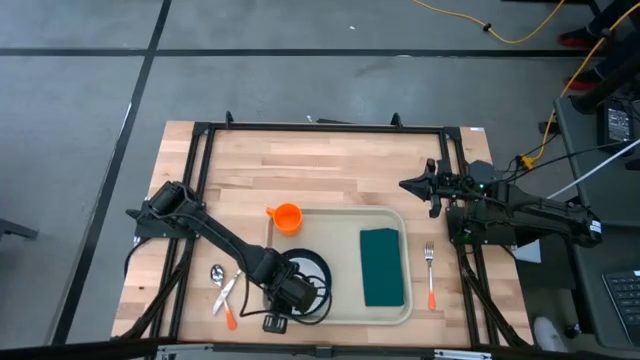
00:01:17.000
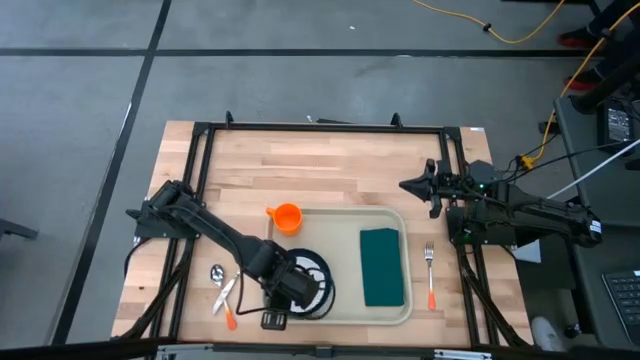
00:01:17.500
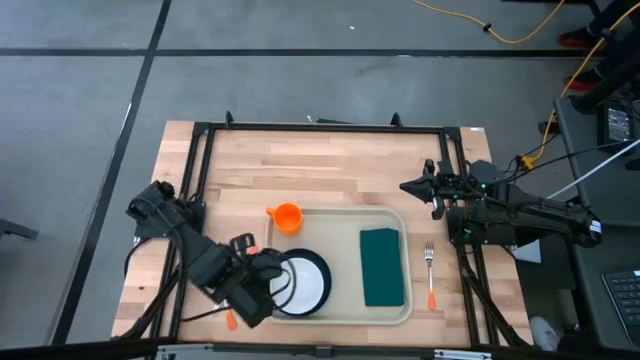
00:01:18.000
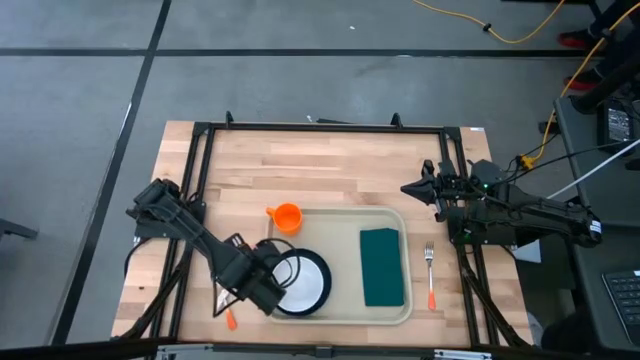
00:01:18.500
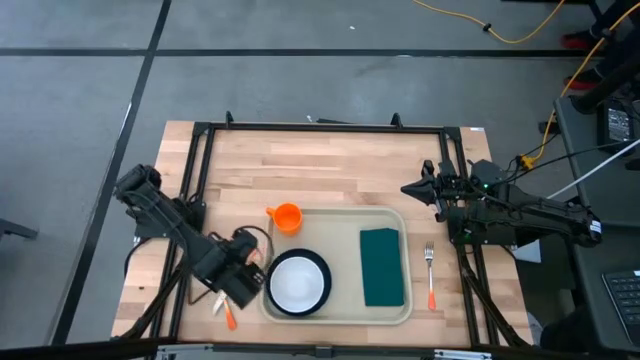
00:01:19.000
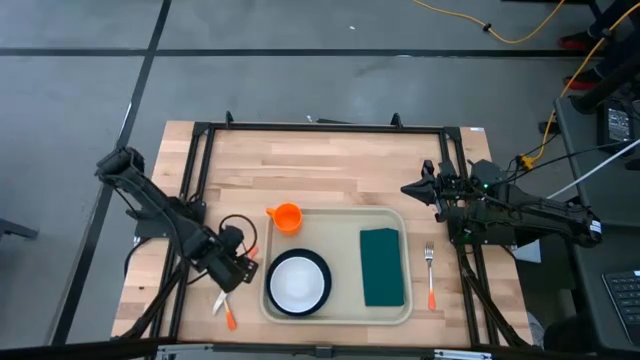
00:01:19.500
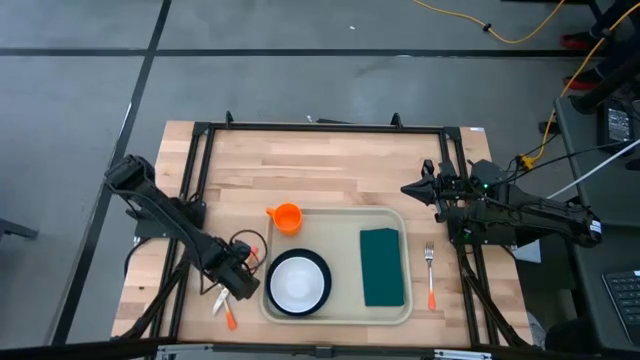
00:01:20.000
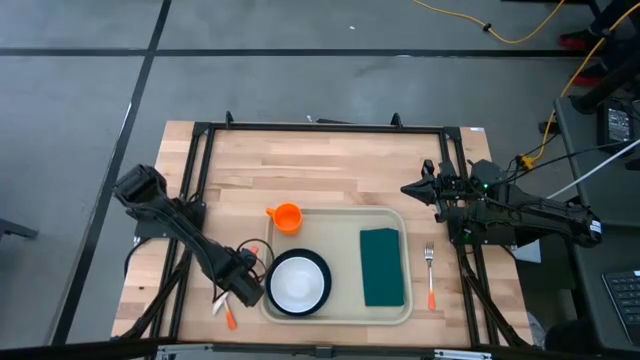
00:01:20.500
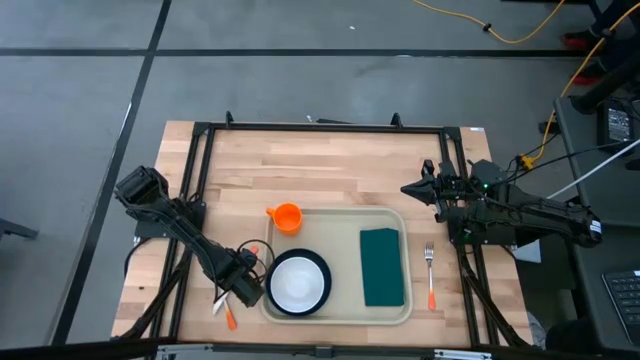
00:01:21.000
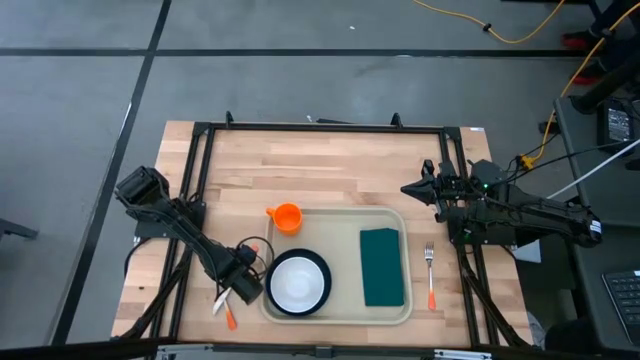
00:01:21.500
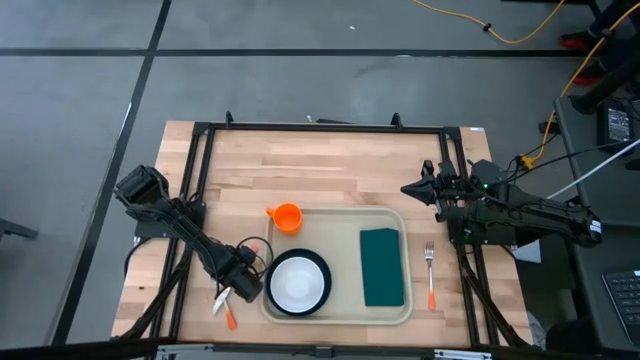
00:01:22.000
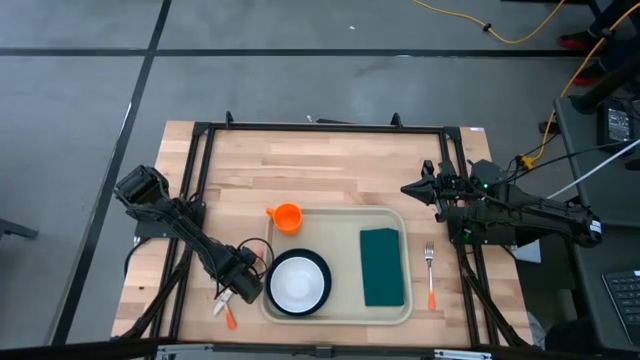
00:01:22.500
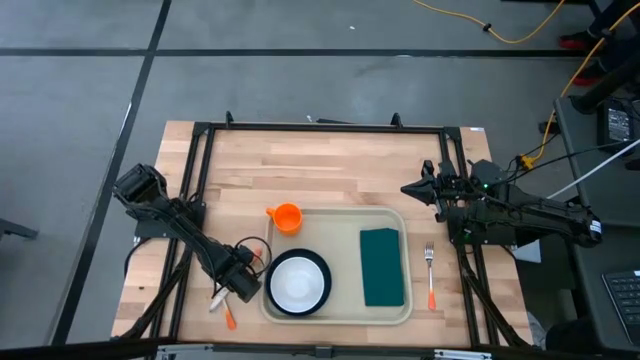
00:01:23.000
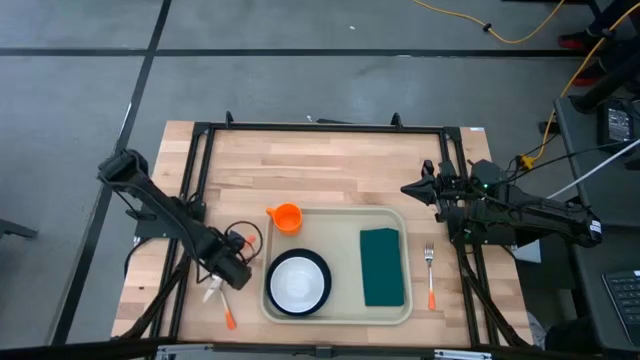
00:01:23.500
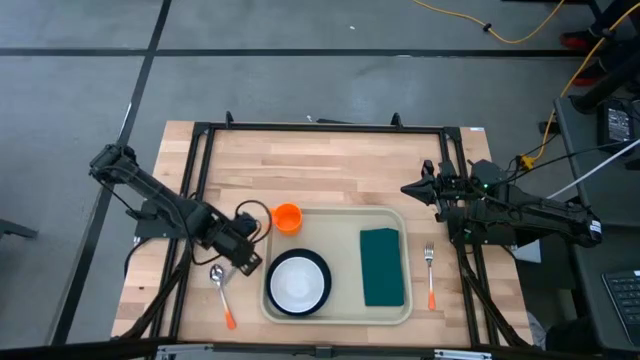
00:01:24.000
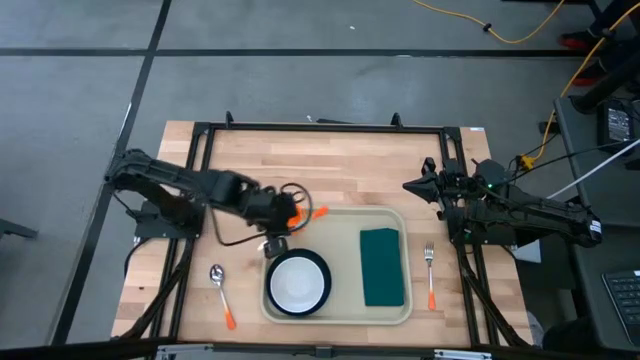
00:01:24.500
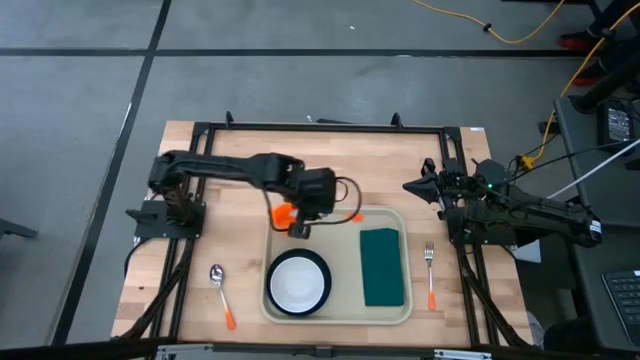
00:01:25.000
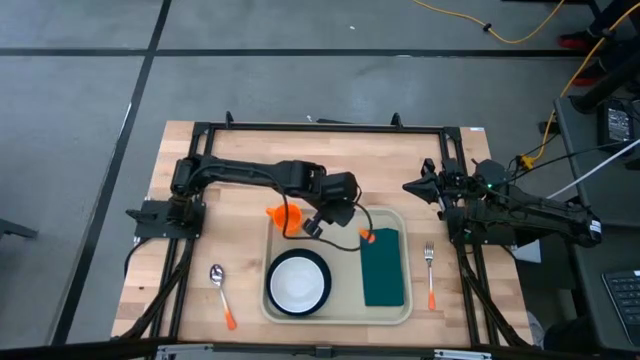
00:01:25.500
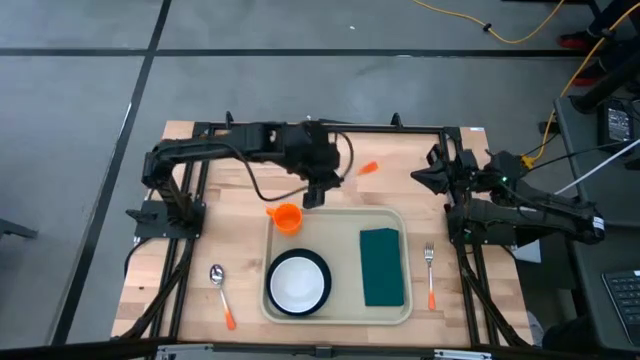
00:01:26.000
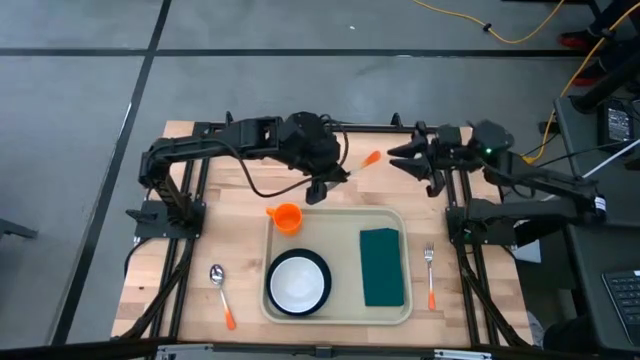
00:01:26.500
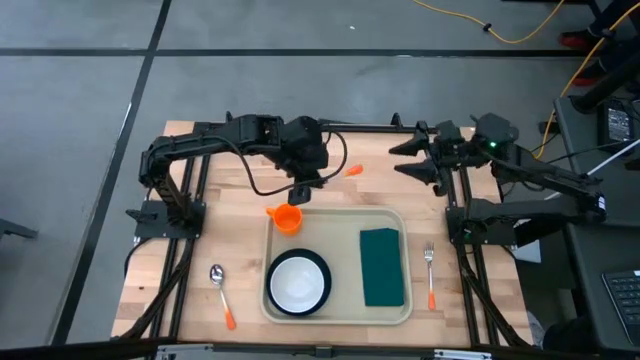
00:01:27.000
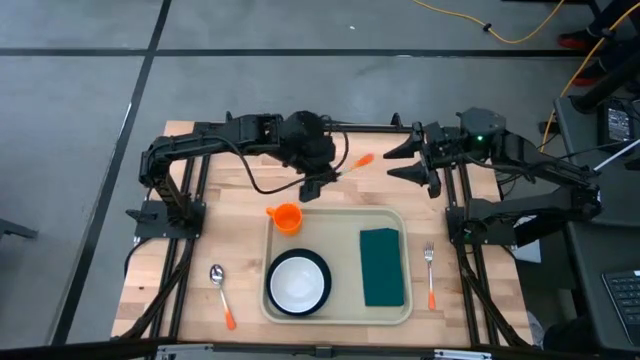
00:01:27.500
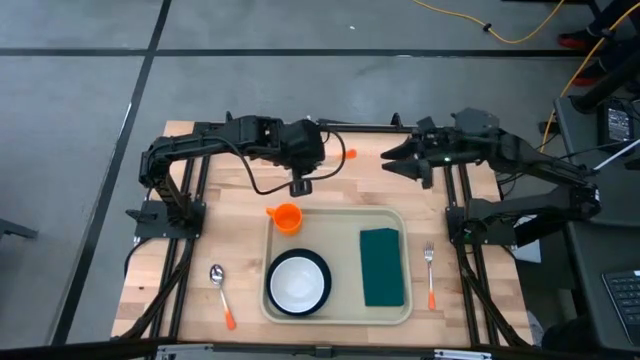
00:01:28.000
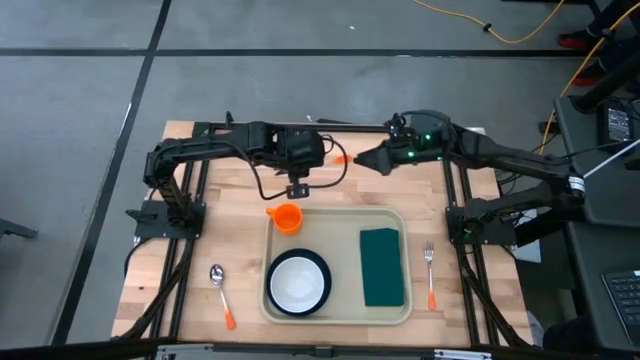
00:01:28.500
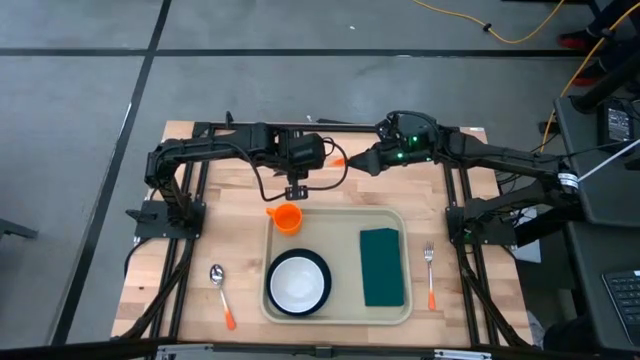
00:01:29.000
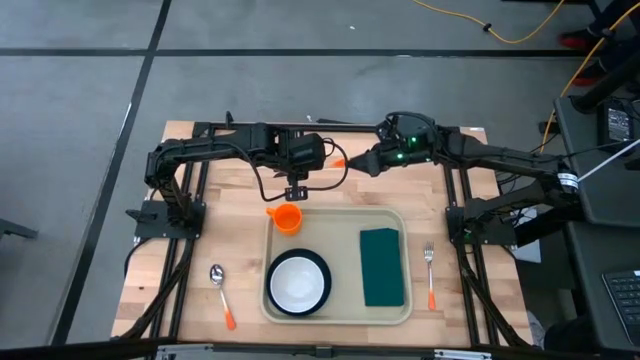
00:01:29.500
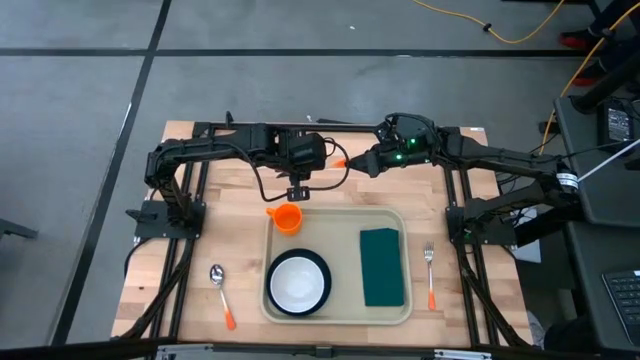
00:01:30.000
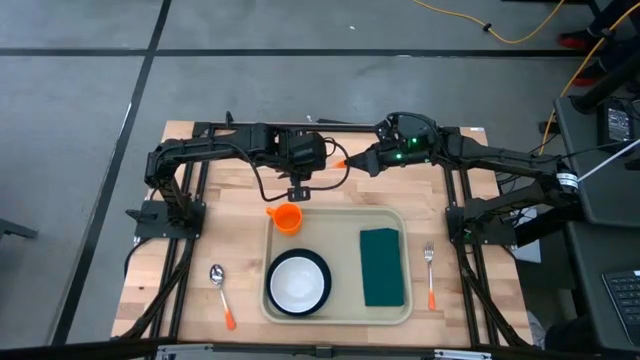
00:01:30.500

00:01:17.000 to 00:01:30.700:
Task: Set up tray
Put the orange knife on the green napkin

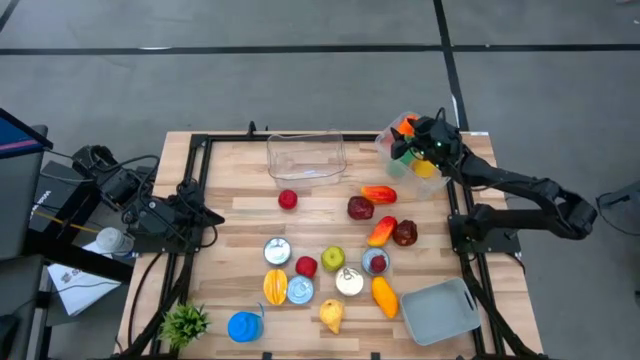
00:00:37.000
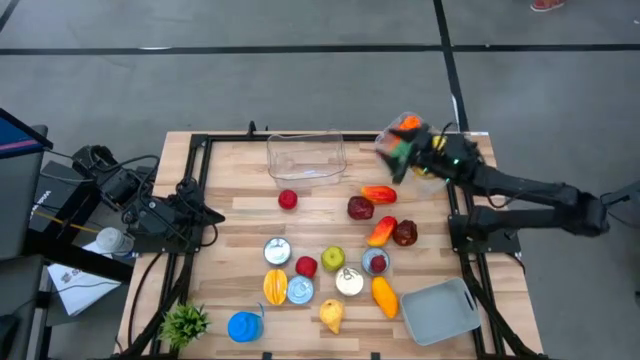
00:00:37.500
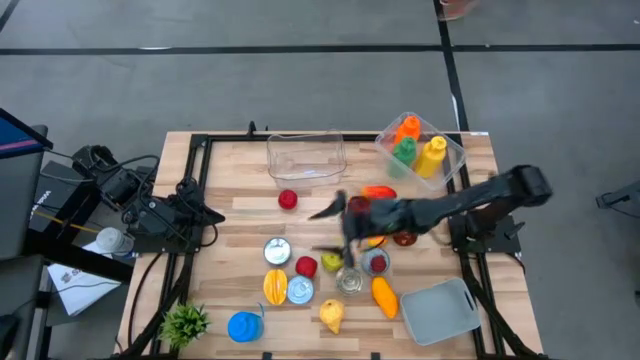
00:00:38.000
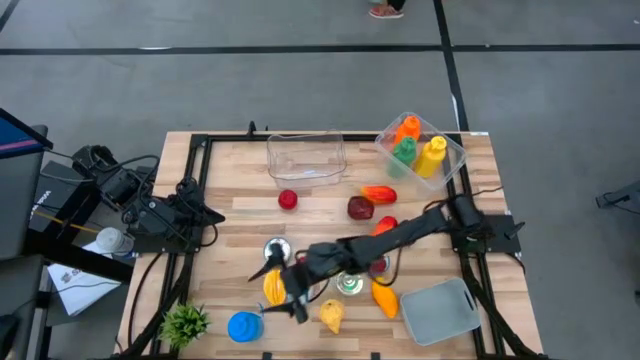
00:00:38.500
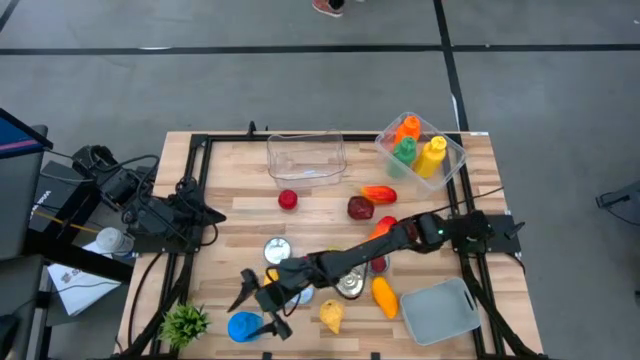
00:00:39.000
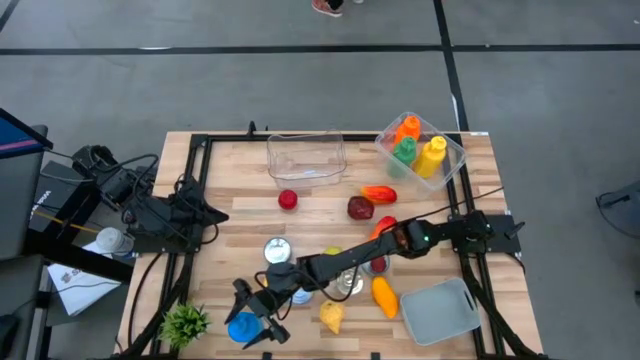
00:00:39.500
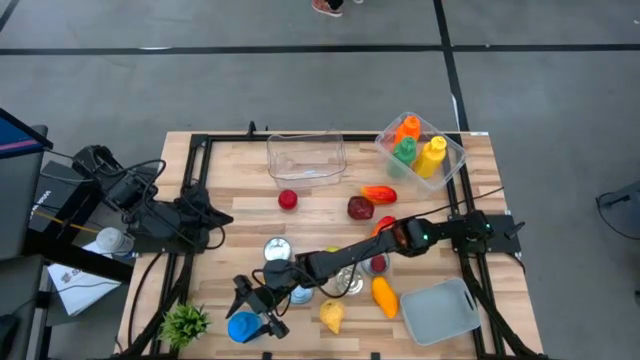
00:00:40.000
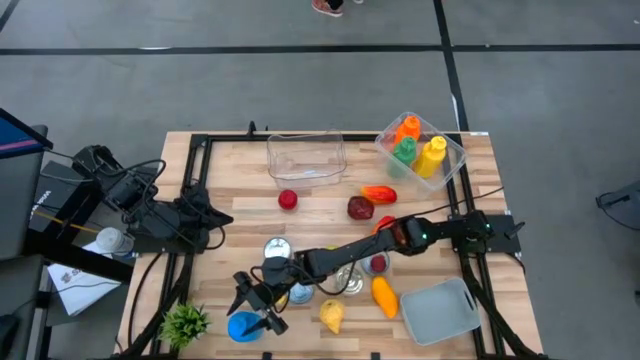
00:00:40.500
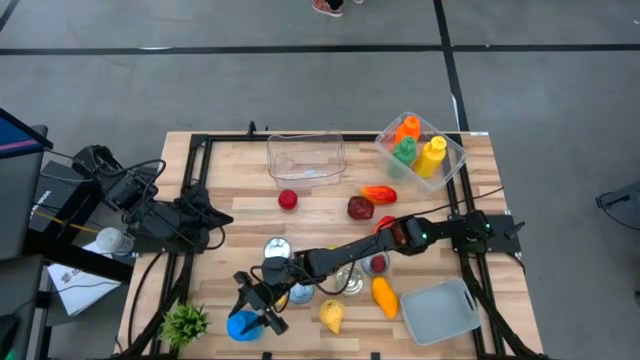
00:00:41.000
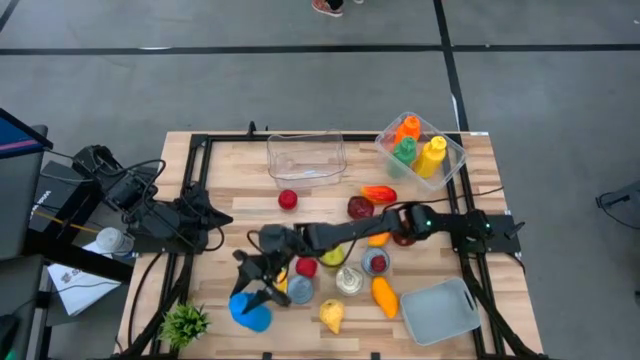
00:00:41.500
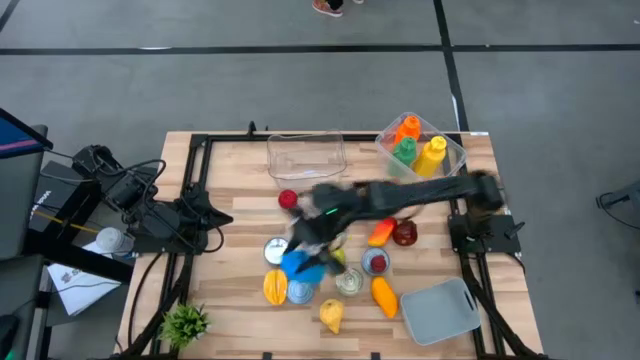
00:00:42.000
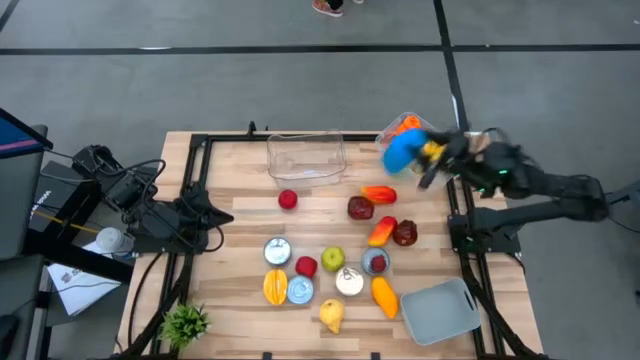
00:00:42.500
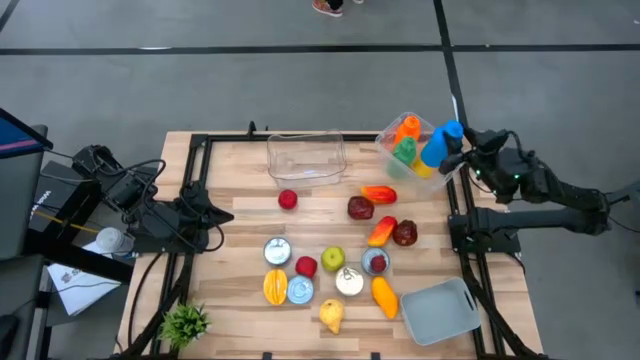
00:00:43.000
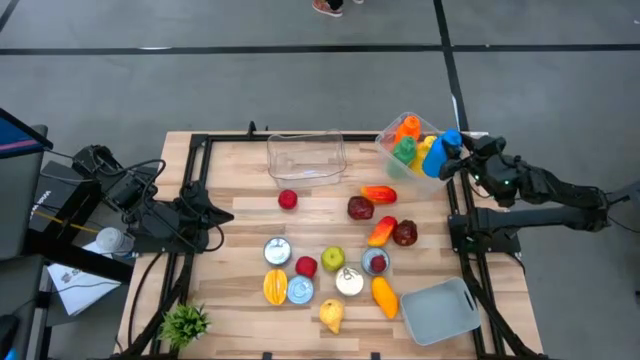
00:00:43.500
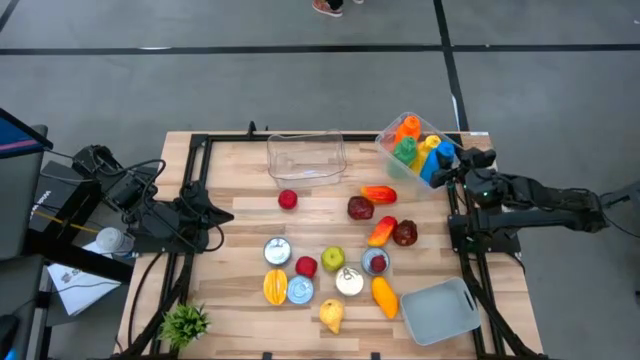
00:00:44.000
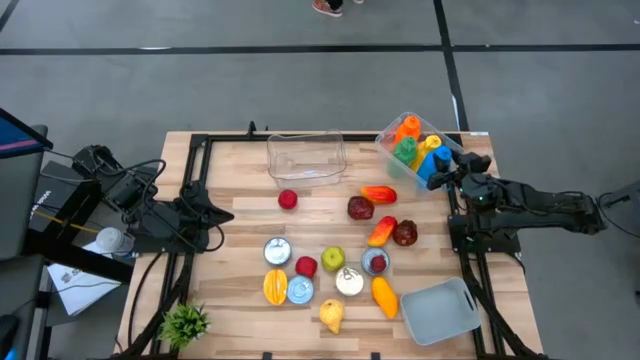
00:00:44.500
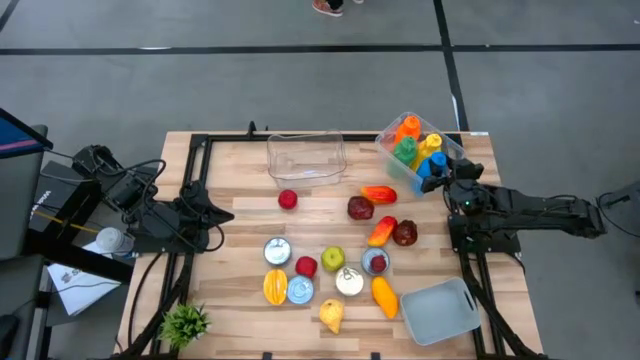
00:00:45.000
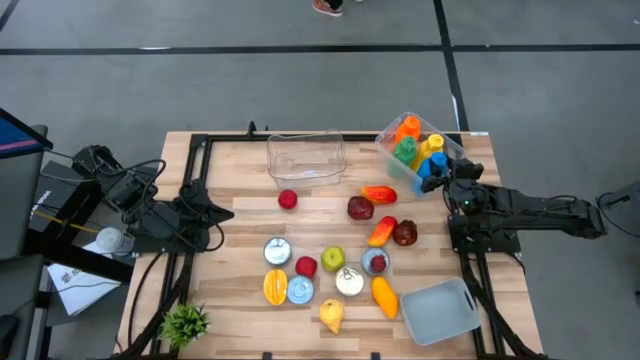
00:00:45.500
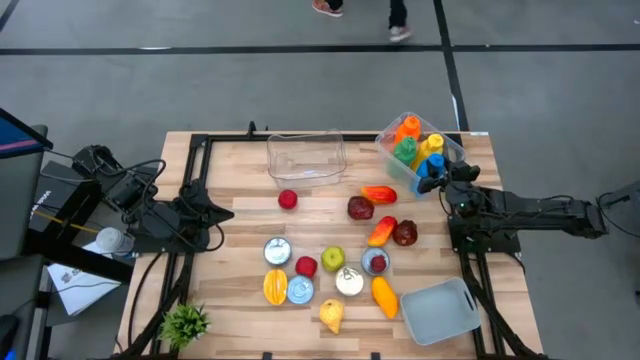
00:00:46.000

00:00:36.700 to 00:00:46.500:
Task: Pick & Place Food Item
Put the blue water bottle into the transparent container
